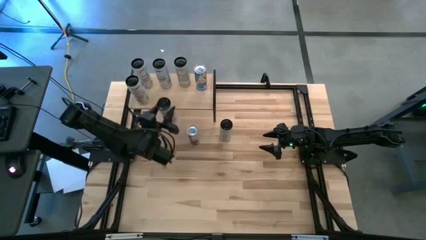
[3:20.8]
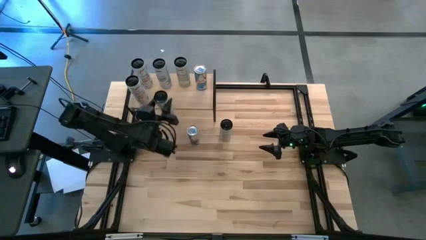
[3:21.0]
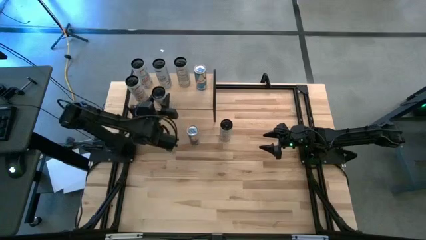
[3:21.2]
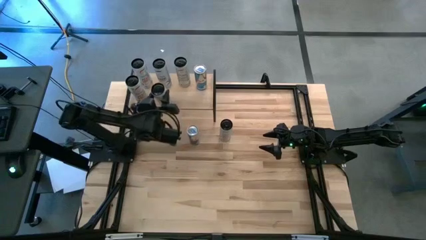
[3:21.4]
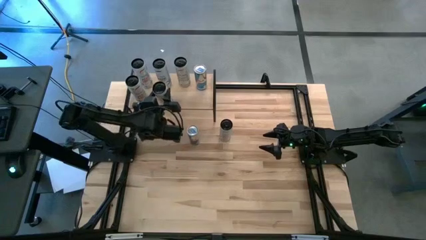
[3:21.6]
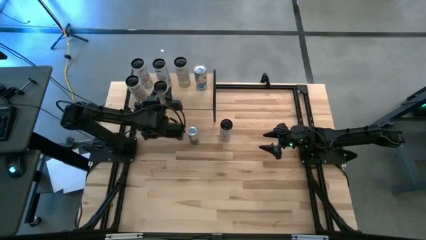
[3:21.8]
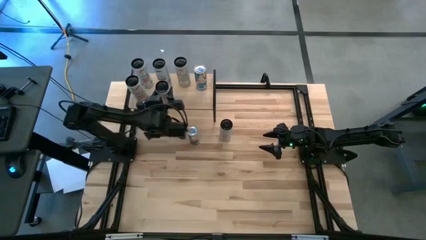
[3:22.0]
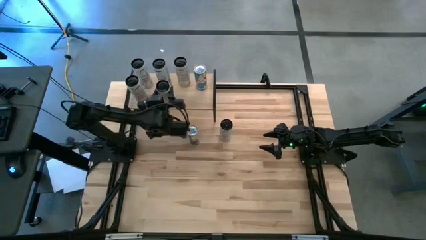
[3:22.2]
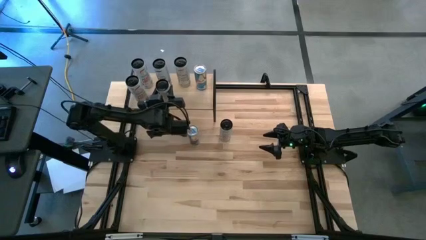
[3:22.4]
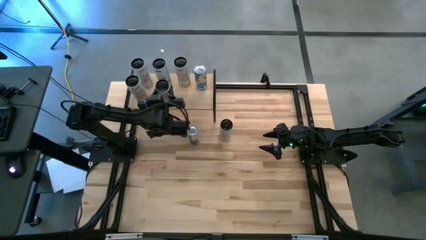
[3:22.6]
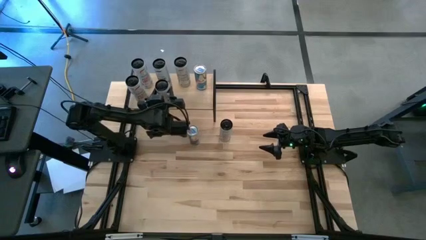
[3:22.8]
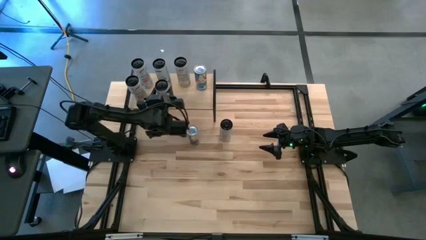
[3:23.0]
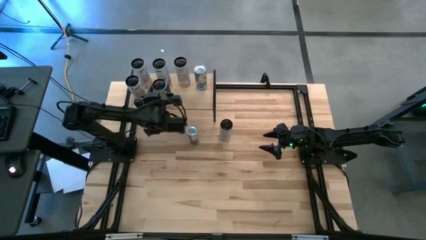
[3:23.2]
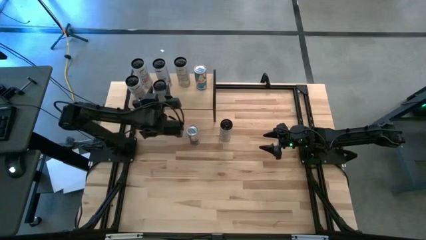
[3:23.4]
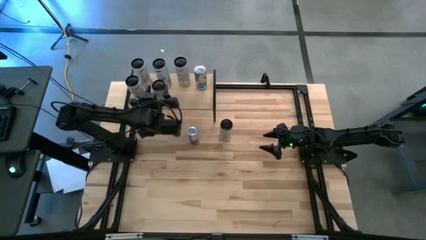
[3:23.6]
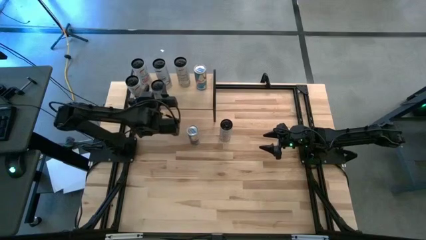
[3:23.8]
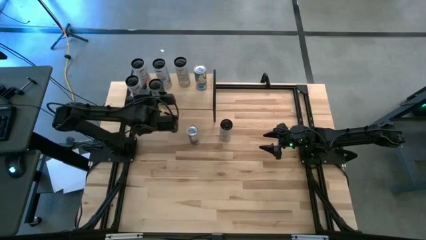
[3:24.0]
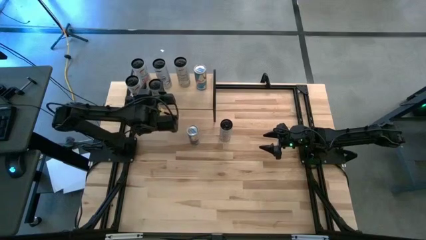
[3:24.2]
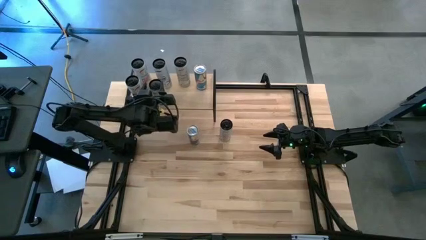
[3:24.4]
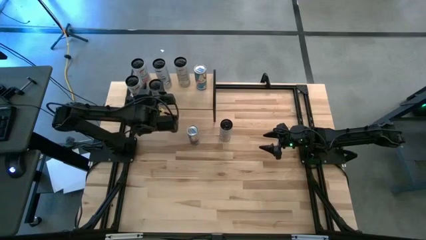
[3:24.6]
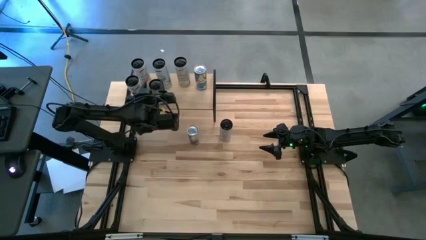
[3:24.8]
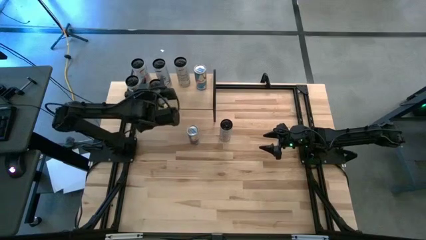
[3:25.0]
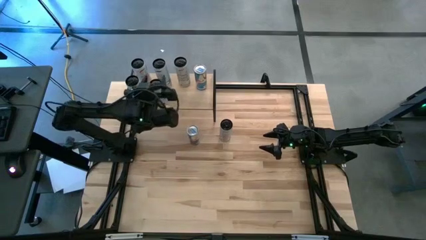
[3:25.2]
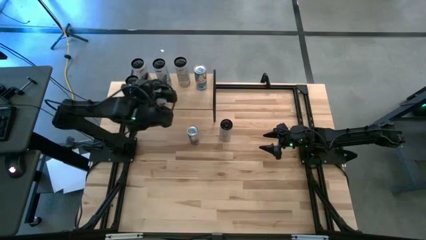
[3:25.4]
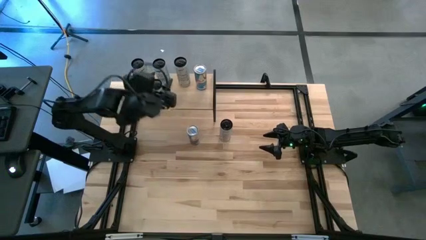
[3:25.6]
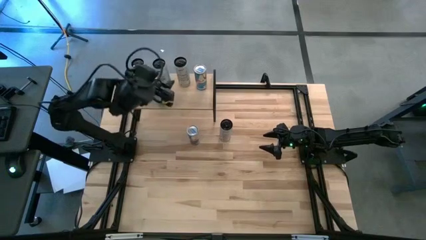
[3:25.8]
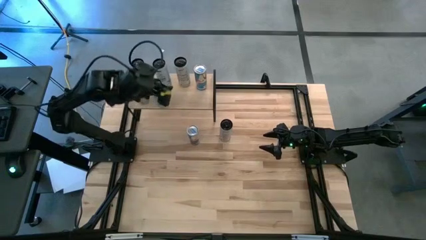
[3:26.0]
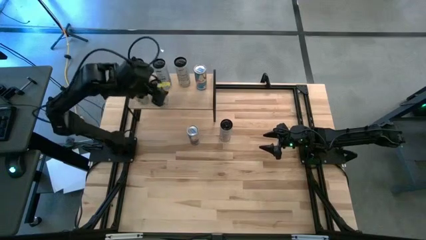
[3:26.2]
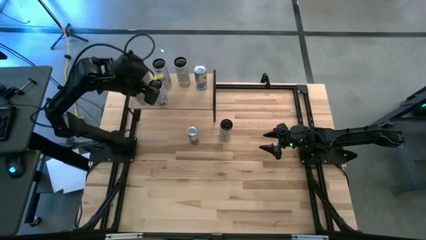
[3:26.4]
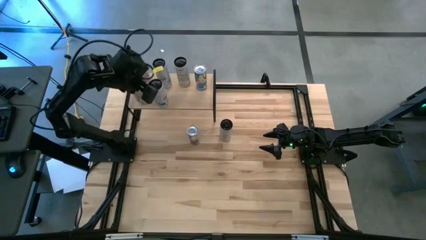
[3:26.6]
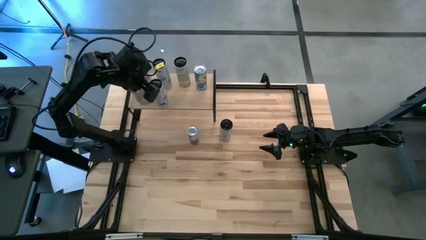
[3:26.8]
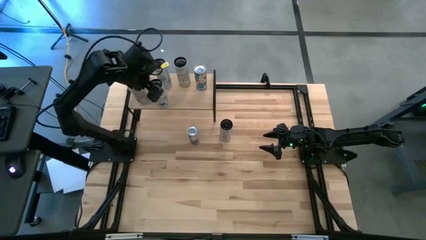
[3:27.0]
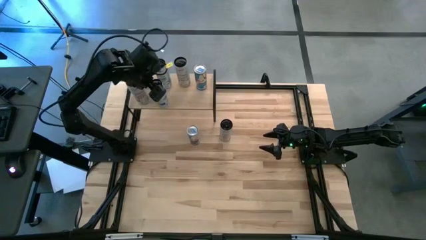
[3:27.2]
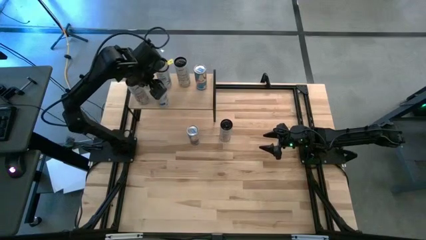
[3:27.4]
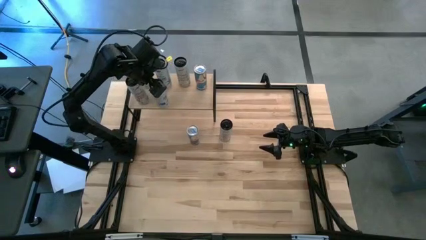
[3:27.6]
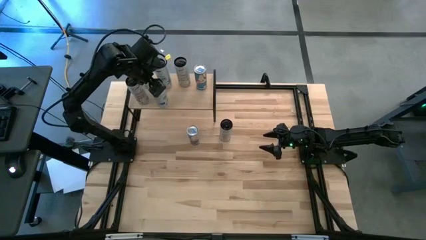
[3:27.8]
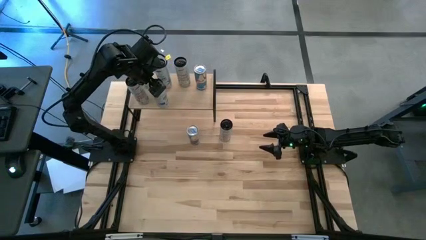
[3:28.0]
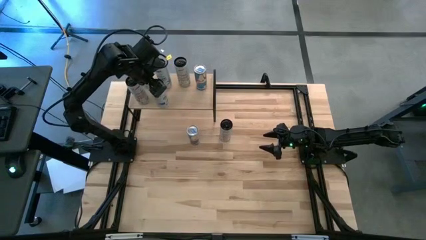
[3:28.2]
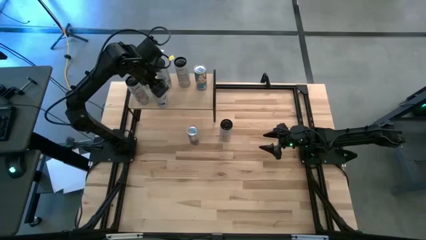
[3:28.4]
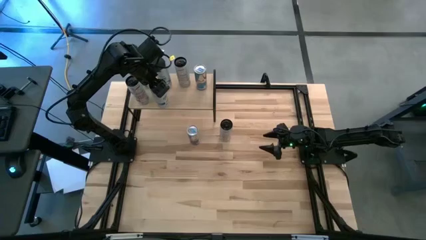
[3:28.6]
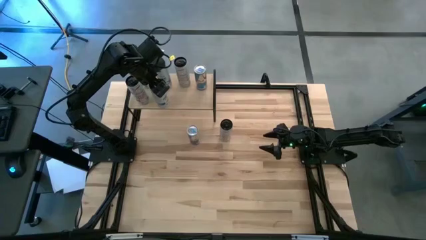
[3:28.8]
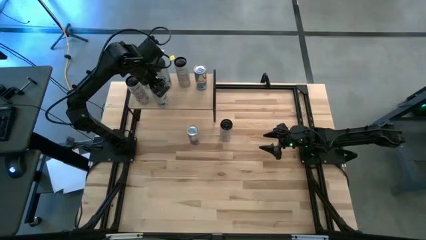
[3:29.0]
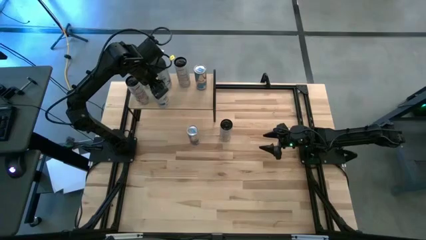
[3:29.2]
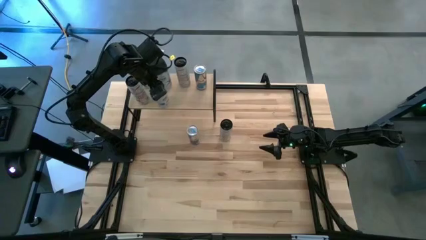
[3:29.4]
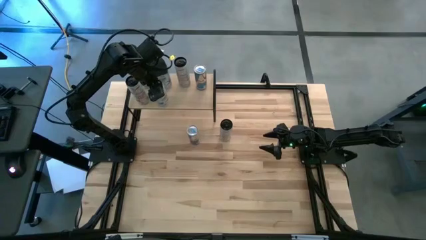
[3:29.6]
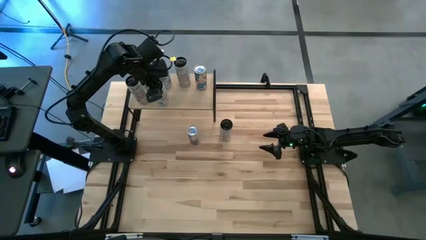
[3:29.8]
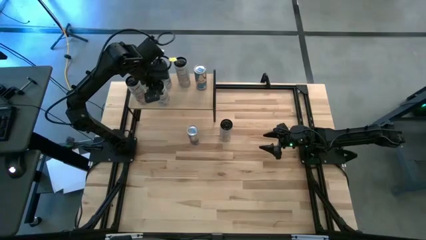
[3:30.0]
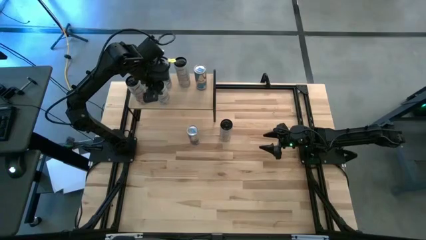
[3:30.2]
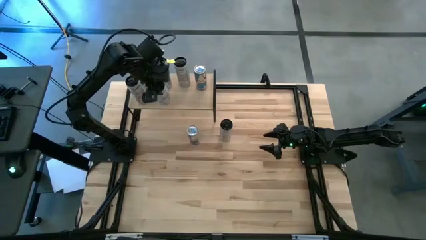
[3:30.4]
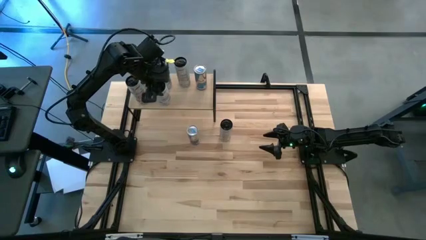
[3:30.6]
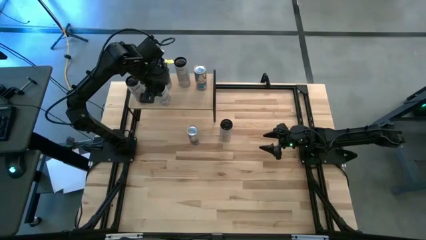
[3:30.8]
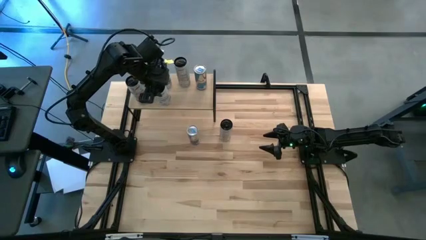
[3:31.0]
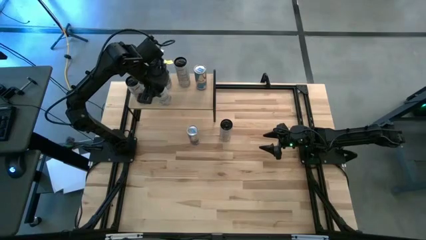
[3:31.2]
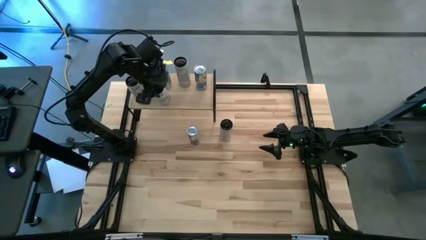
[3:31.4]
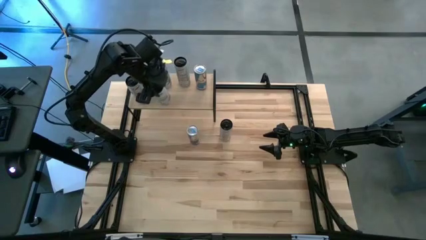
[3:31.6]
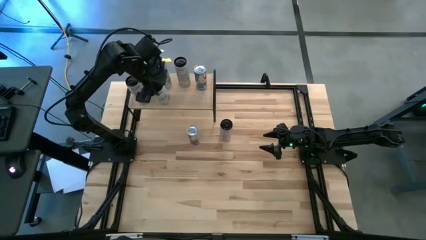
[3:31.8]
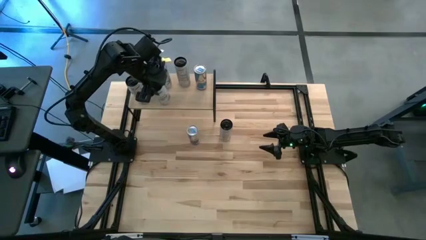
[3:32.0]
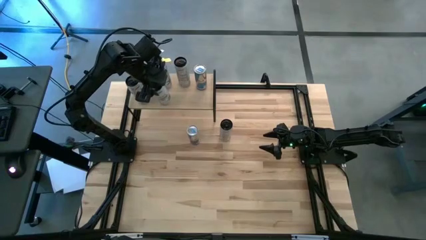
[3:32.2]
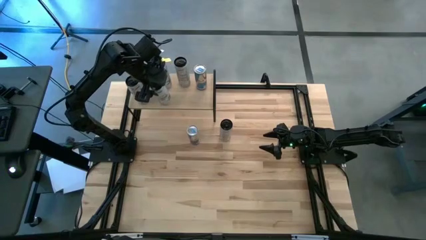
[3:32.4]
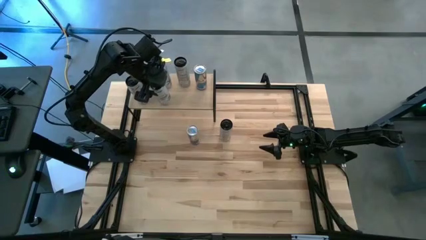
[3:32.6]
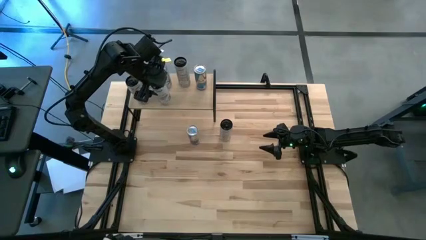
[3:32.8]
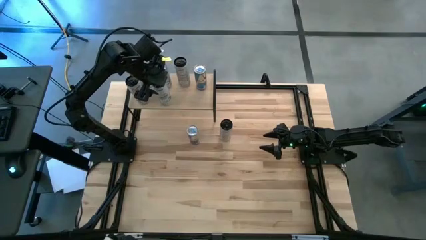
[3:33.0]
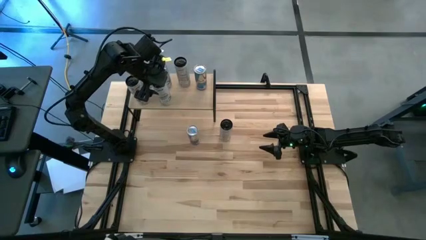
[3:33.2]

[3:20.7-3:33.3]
Task: Place canned beverage on shelf
Put the white blue soda can on the shelf aligned with the other white blue soda can
